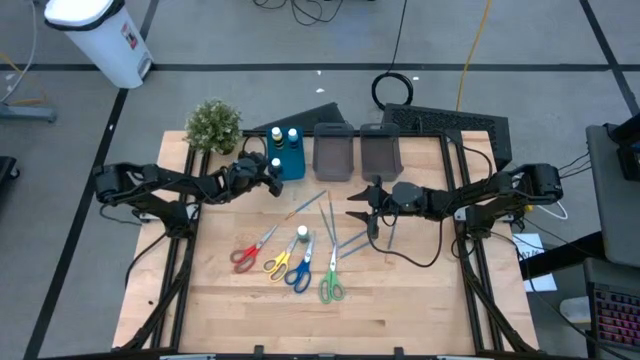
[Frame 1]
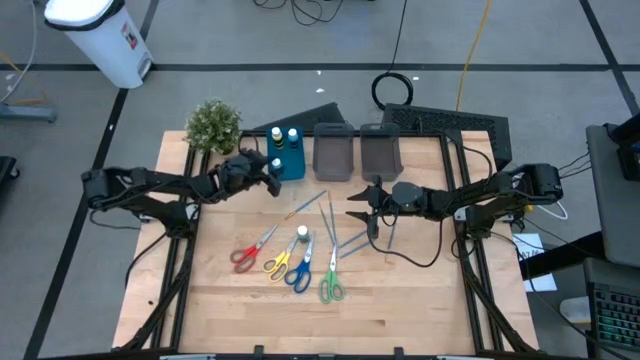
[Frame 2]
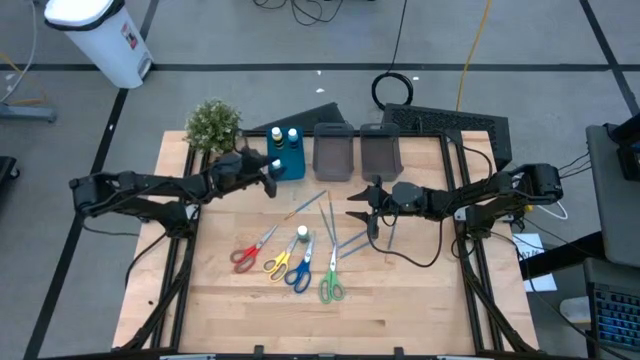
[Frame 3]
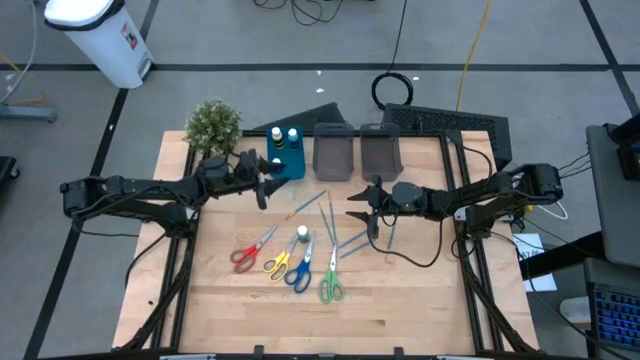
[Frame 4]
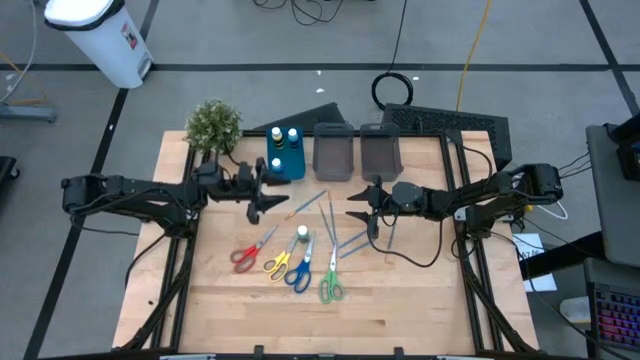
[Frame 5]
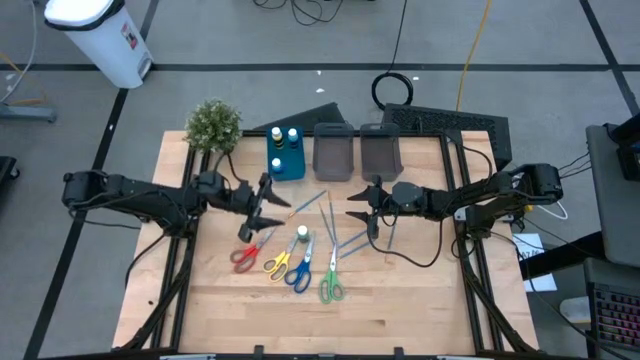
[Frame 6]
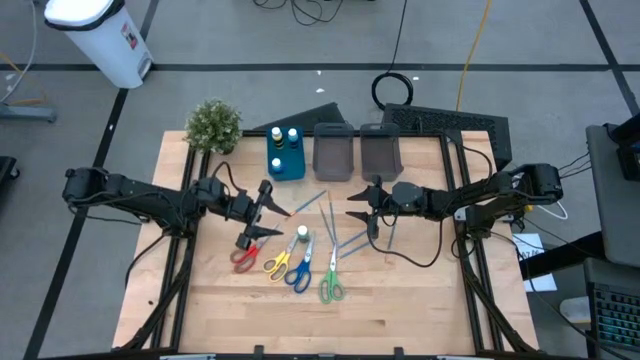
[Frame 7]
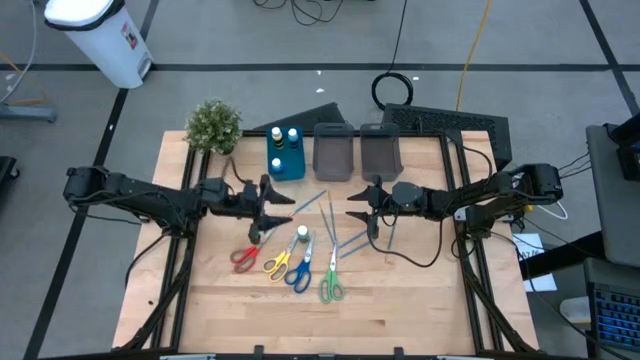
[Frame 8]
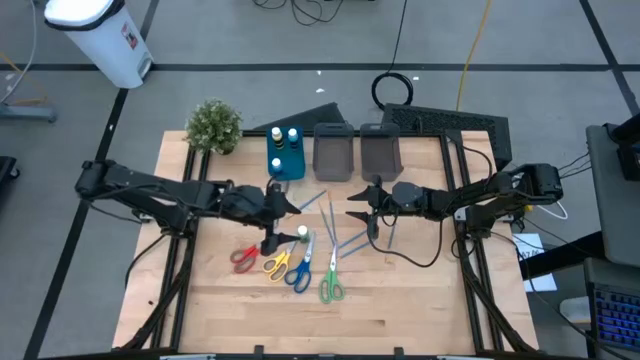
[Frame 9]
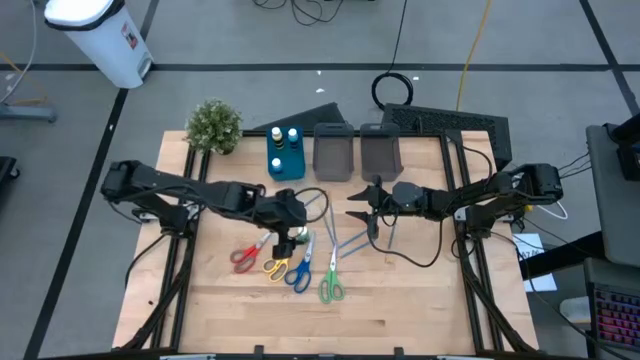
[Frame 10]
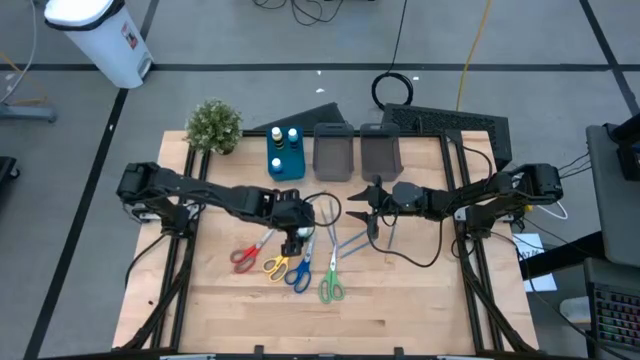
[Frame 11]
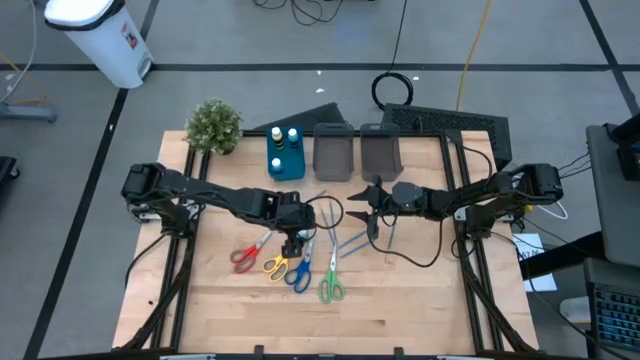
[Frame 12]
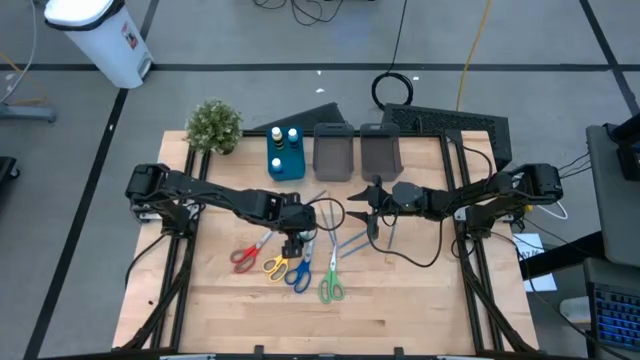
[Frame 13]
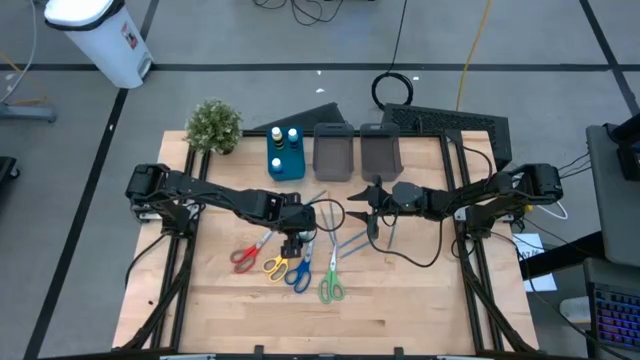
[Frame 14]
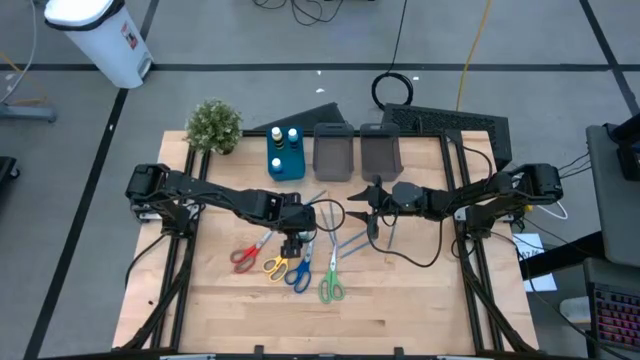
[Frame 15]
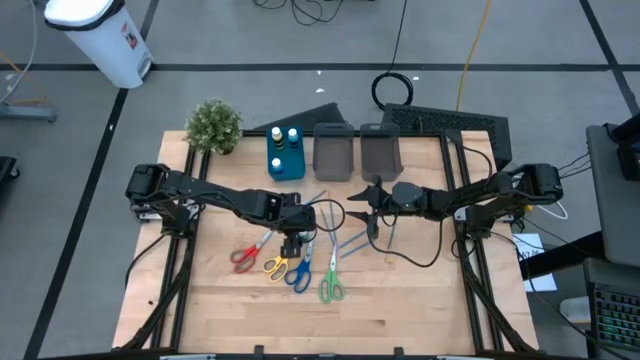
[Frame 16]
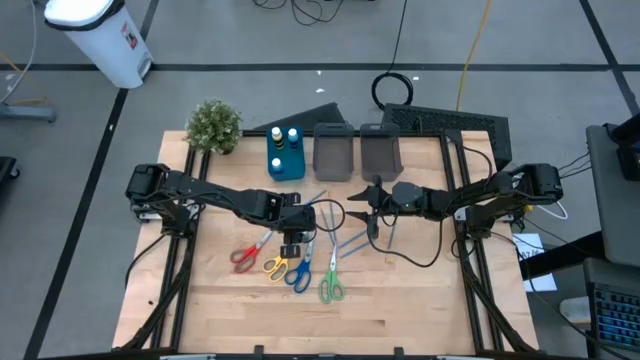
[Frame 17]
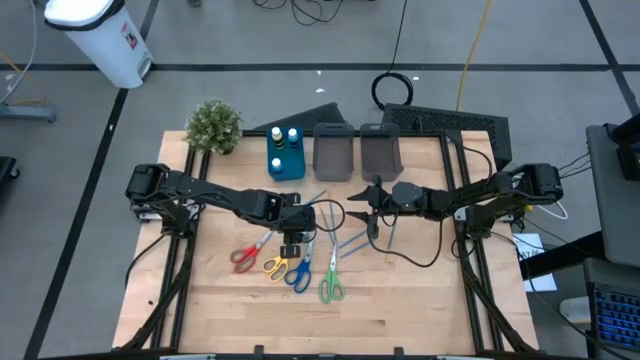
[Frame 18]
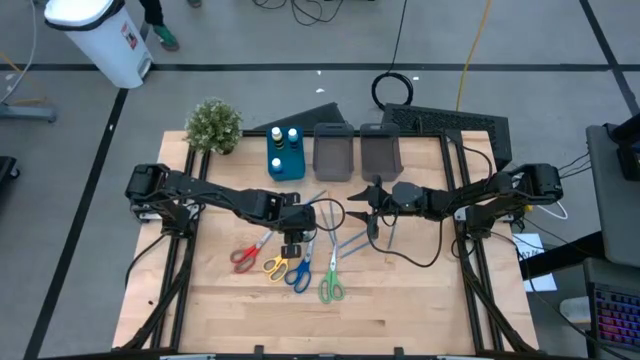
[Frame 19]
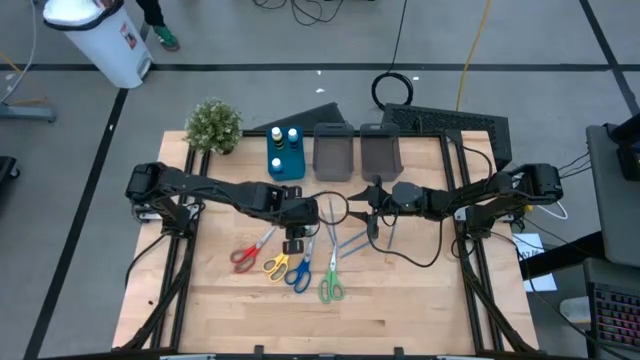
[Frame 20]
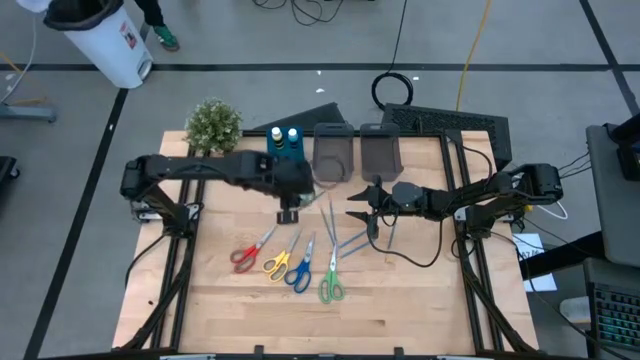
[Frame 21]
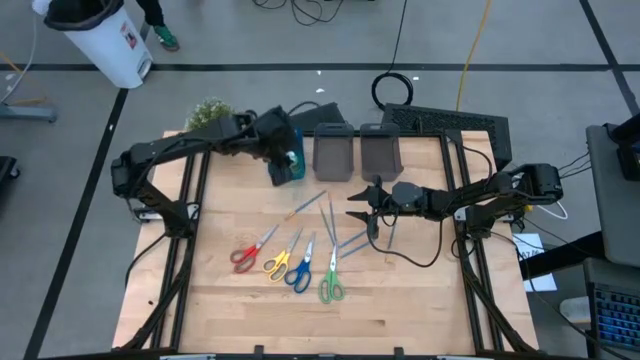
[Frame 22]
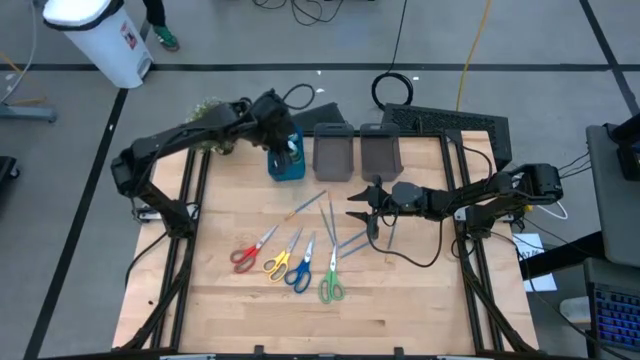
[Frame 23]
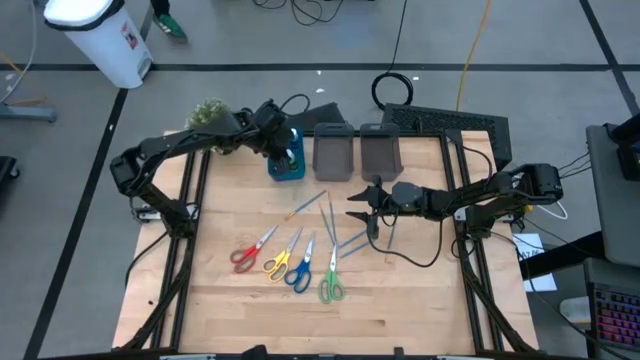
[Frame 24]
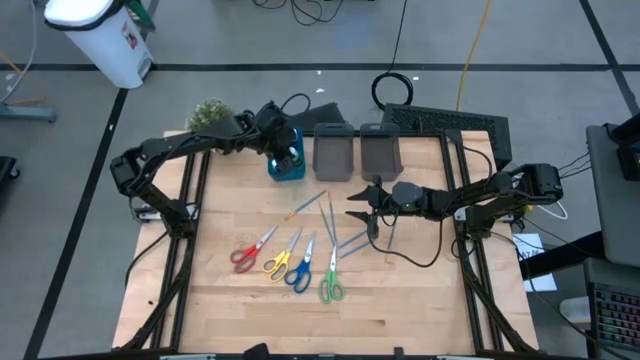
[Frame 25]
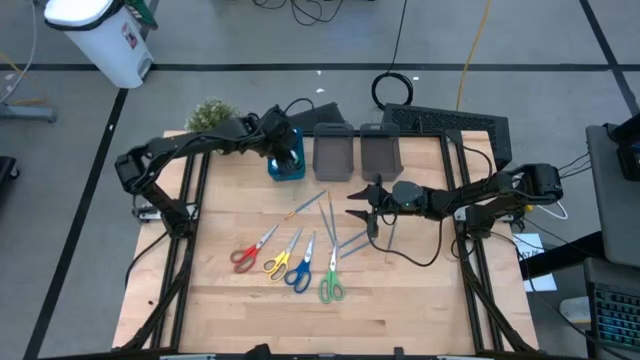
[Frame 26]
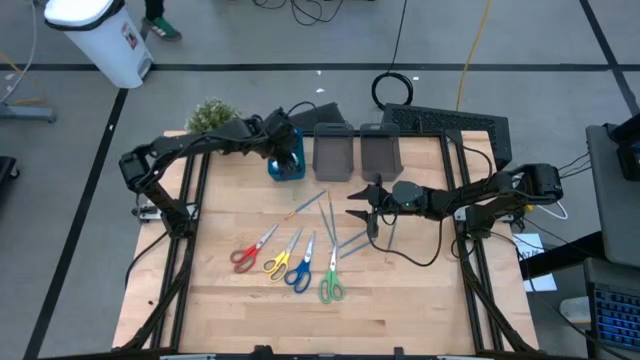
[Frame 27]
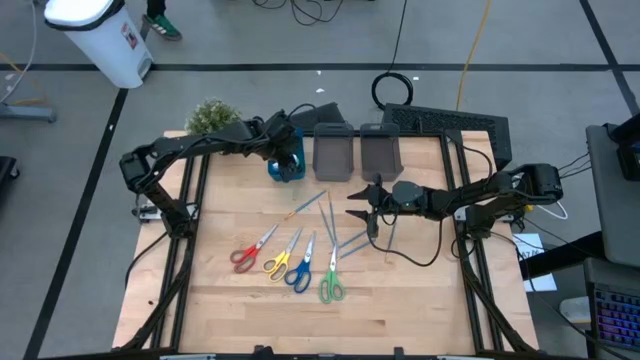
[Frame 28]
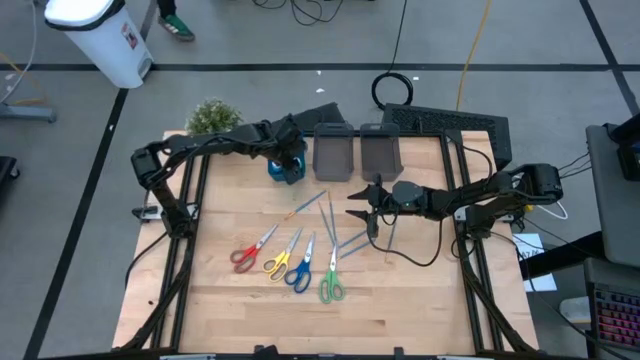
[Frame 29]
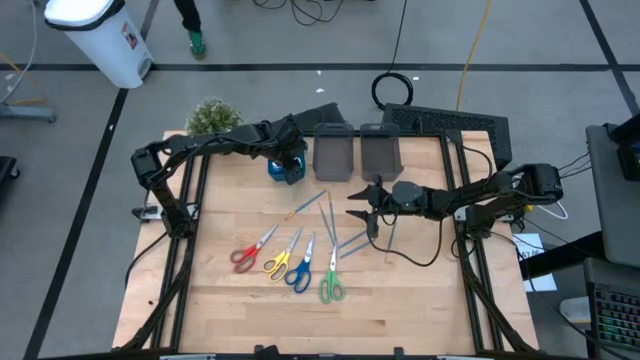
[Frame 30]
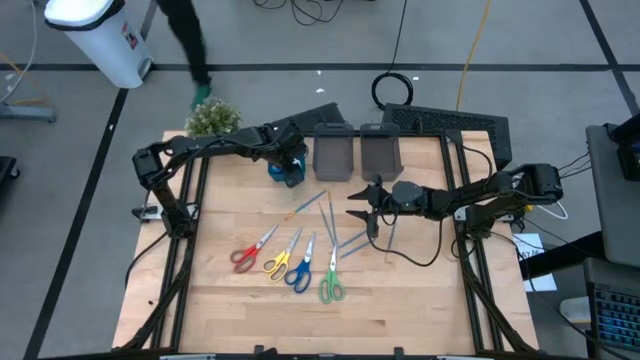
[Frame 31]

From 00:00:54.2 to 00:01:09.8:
Task: Pick & Place Paint Supplies
Put the green paint into the blue bin

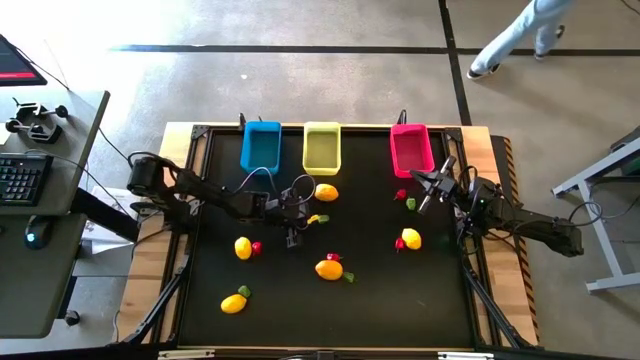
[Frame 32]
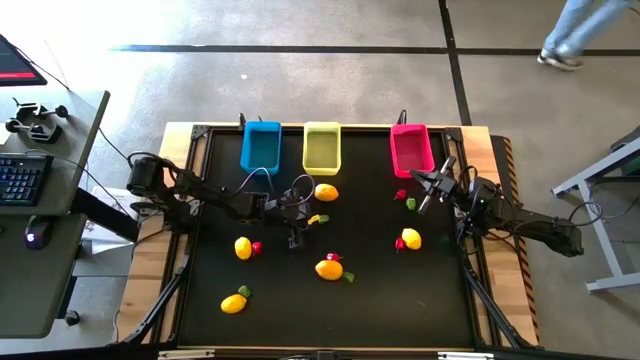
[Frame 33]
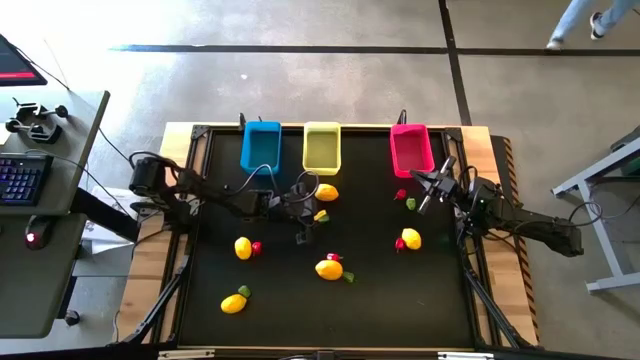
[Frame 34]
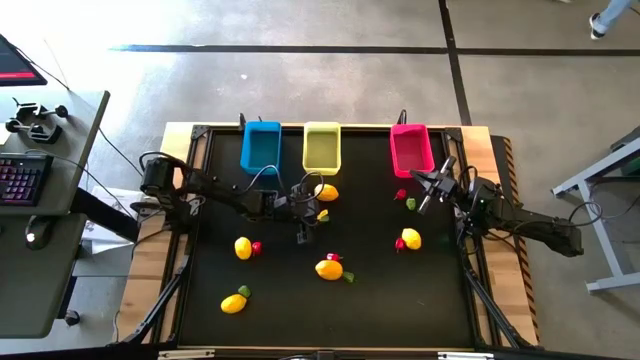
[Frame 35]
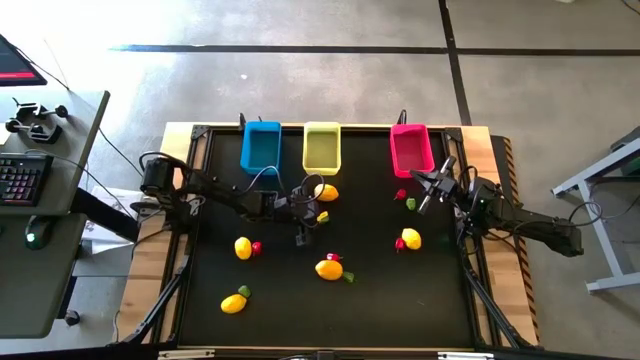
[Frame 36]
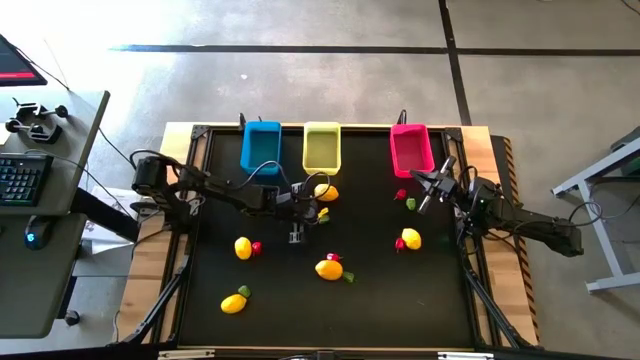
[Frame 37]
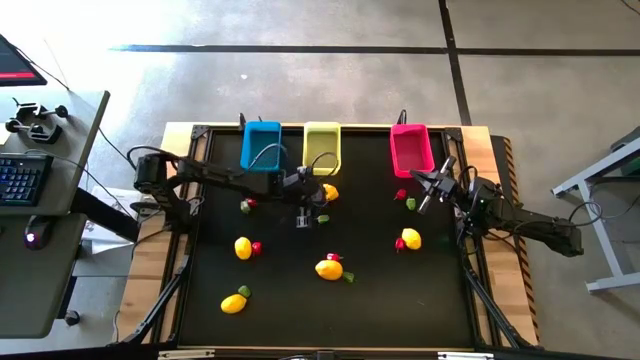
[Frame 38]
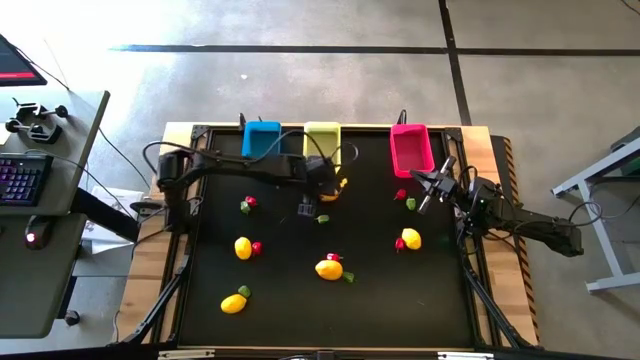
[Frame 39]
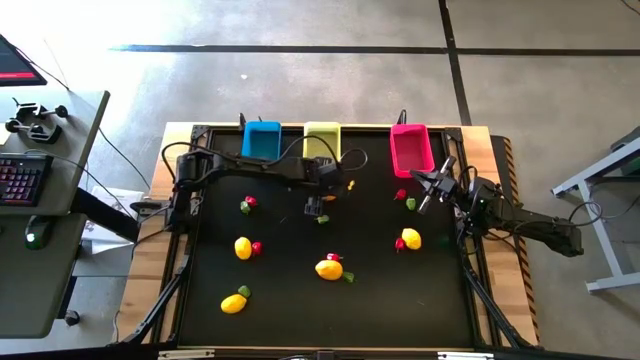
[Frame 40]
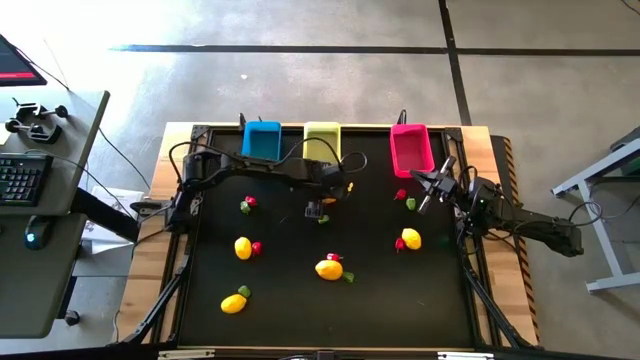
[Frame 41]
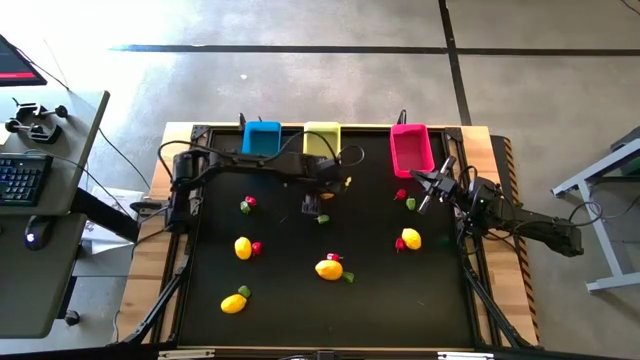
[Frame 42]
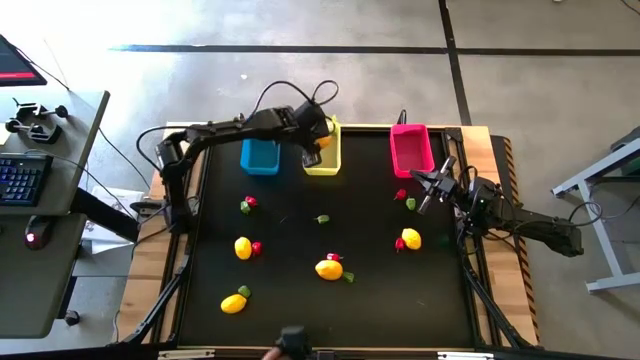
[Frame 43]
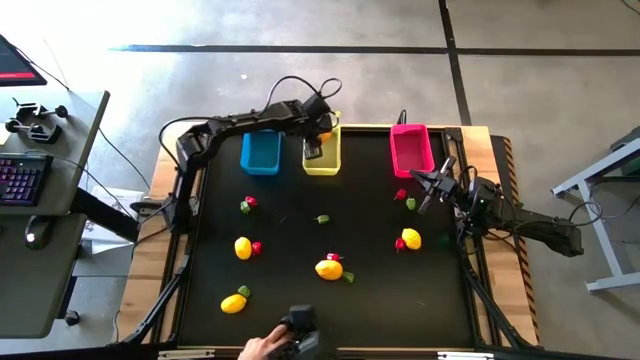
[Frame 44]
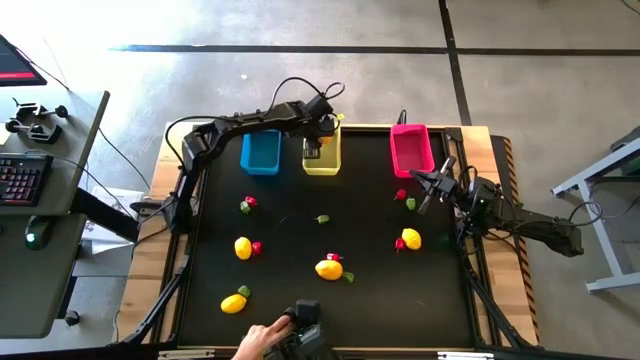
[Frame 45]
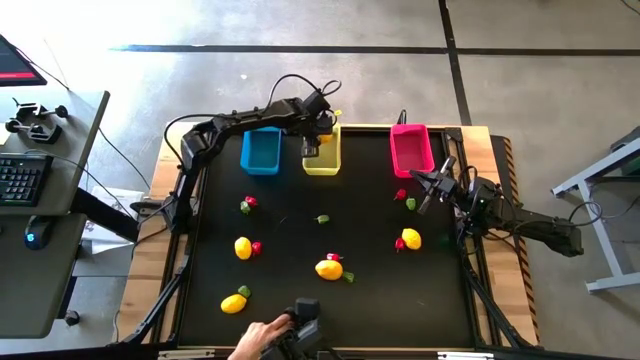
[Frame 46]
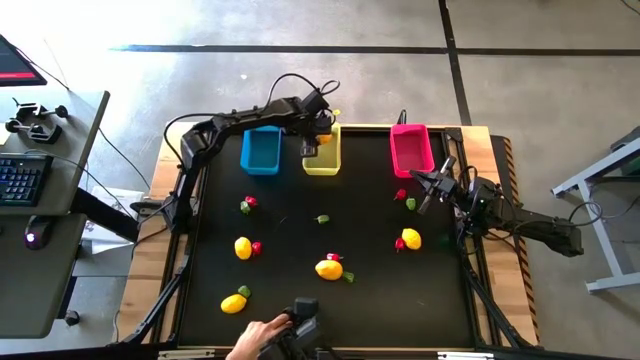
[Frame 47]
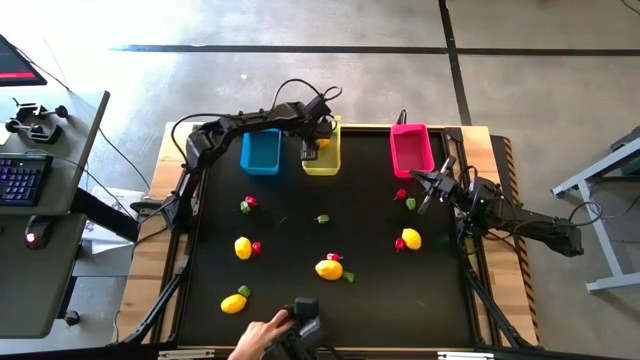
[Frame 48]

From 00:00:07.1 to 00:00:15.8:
Task: Sort produce into baskets
Put the yellow lemon into the yellow bin
